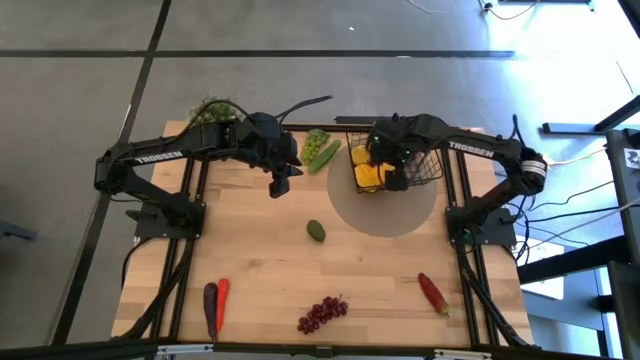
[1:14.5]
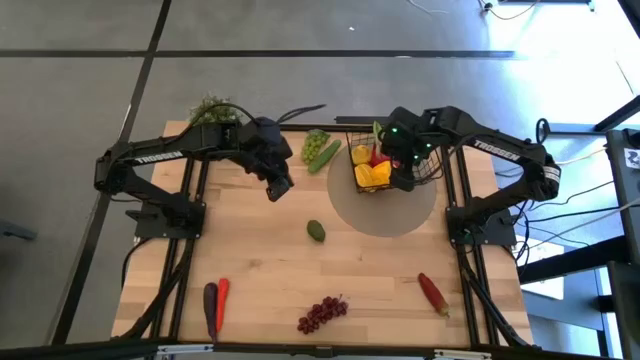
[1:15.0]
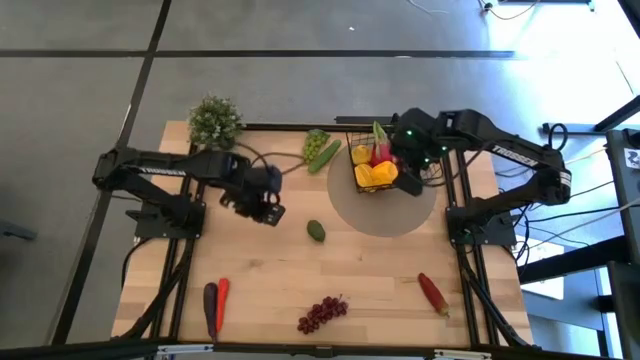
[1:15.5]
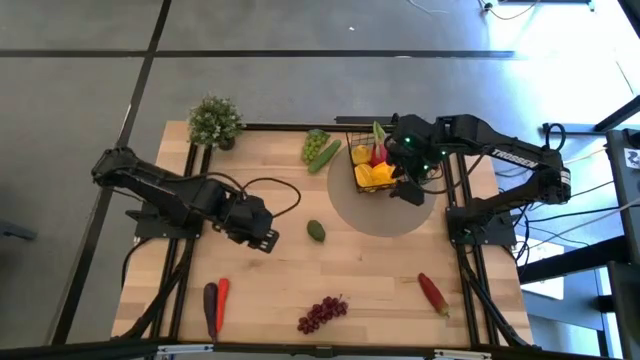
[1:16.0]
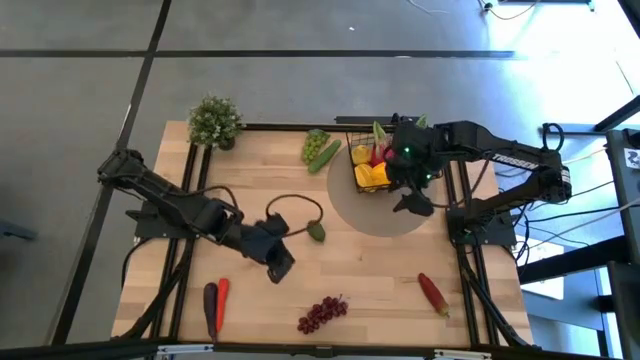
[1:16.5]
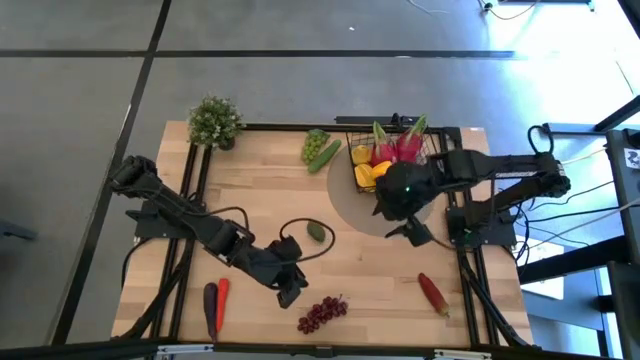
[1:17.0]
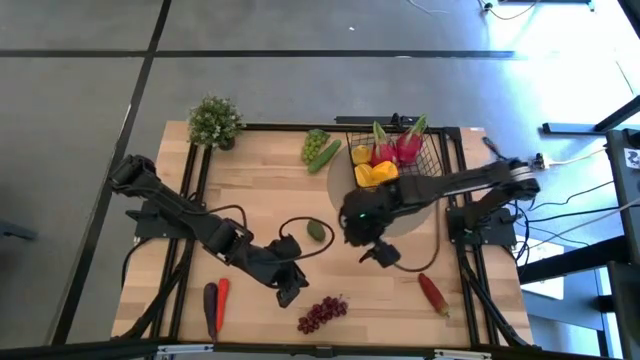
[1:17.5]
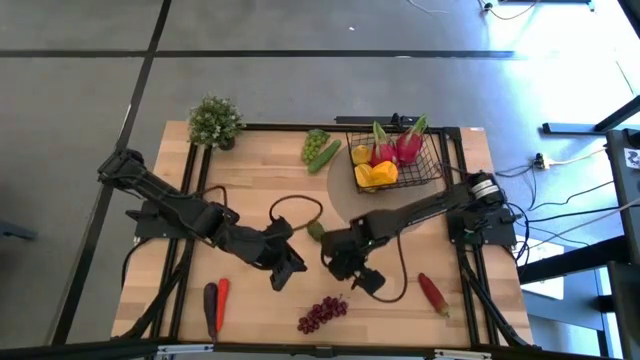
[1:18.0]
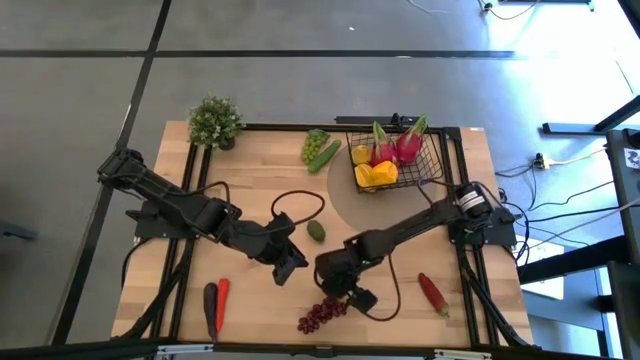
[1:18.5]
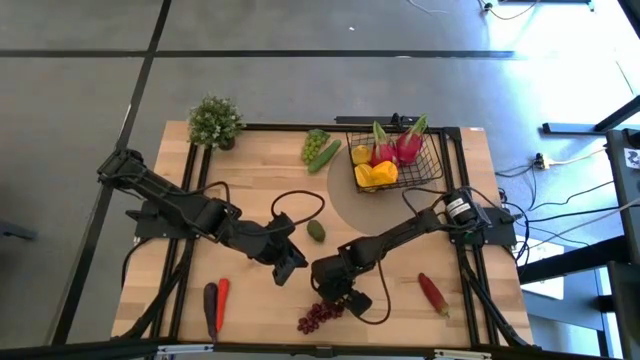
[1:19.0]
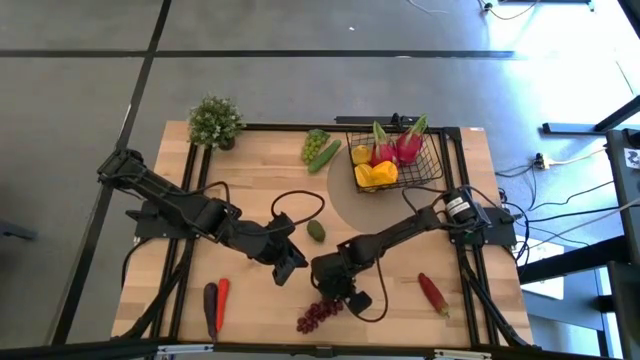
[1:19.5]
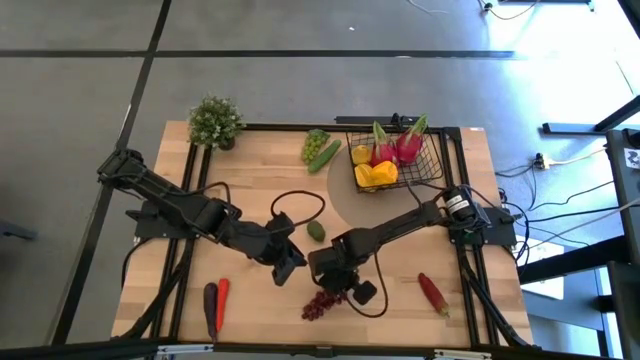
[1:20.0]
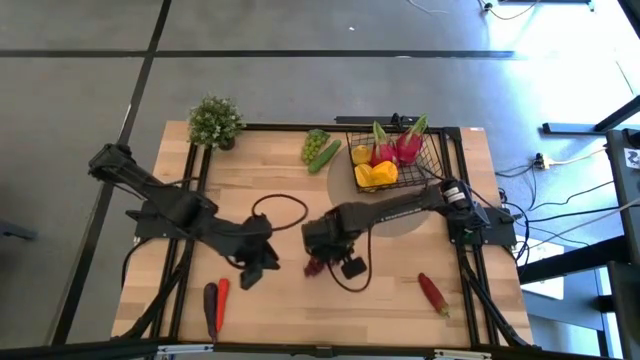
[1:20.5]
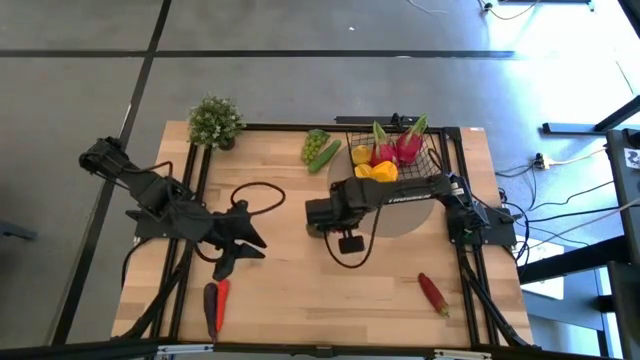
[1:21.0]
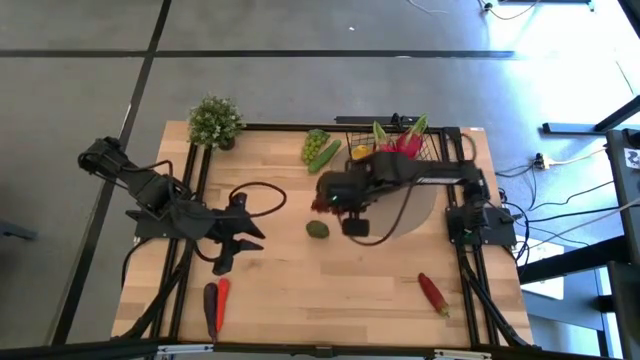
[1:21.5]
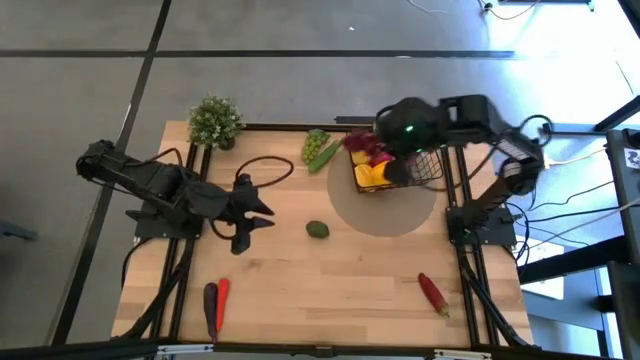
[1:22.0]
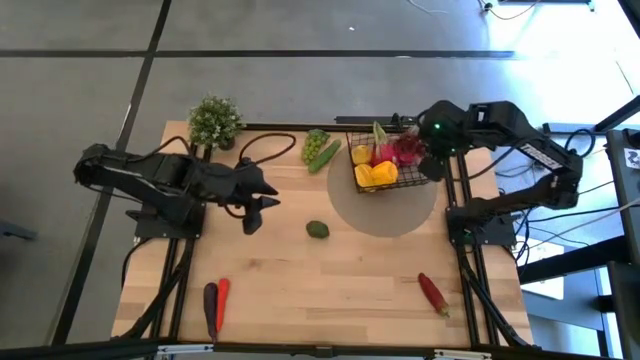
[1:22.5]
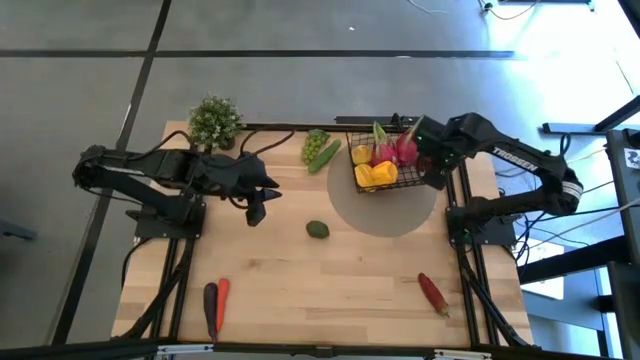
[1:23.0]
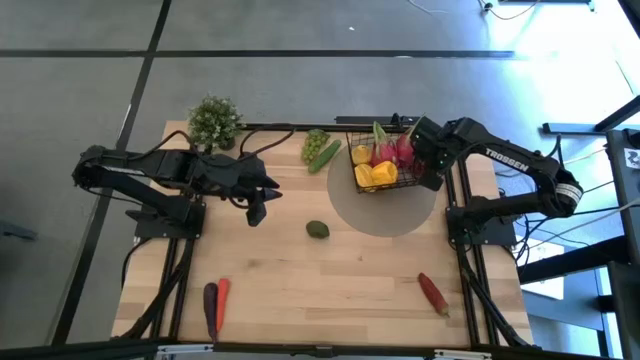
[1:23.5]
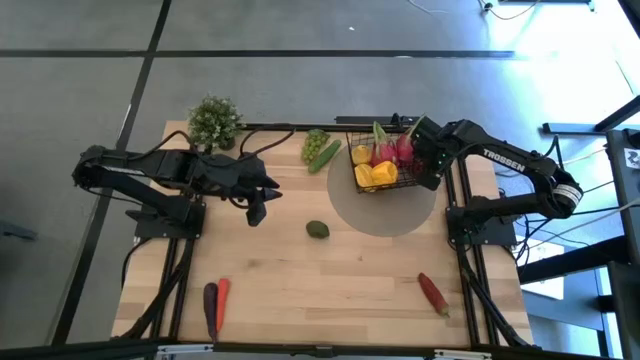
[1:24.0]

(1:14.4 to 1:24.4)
Task: Build produce basket
Put the red grapes into the wire basket

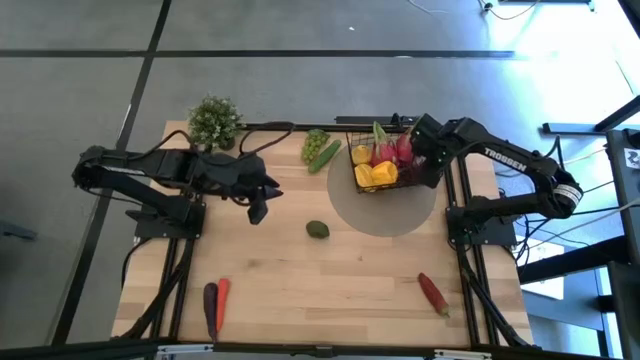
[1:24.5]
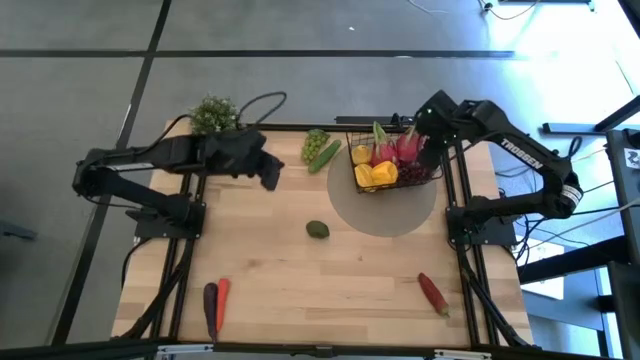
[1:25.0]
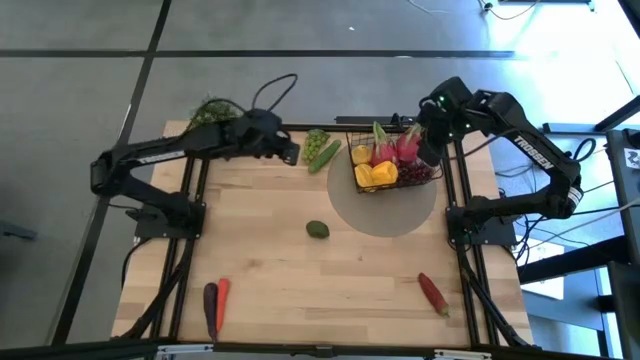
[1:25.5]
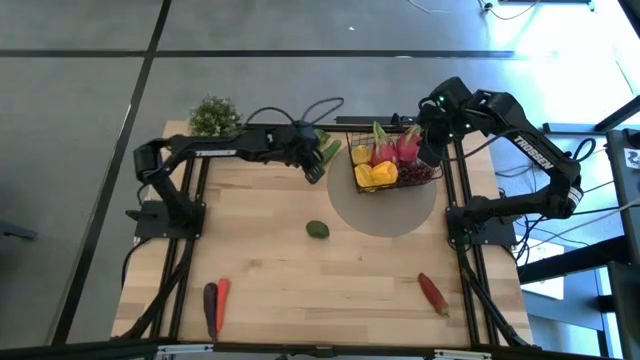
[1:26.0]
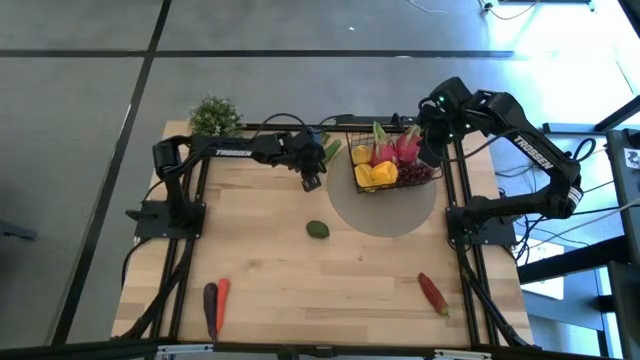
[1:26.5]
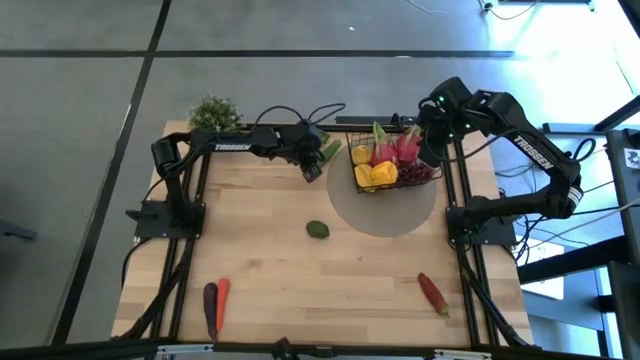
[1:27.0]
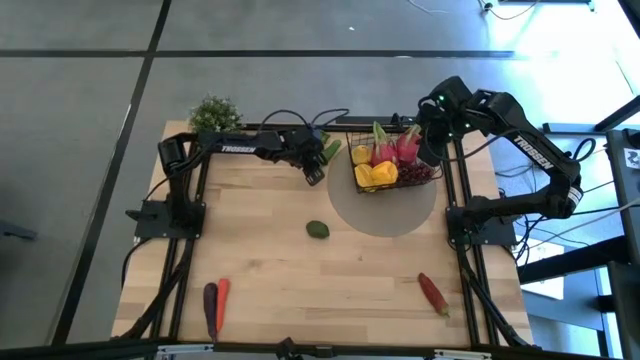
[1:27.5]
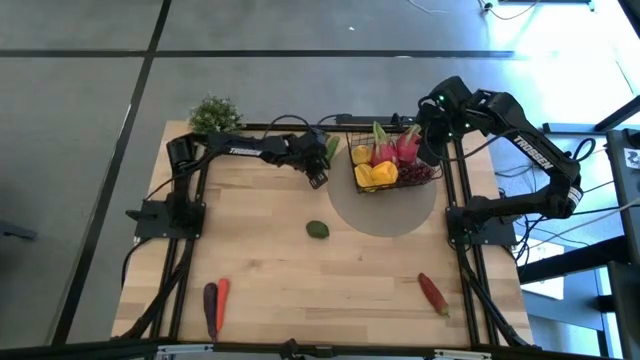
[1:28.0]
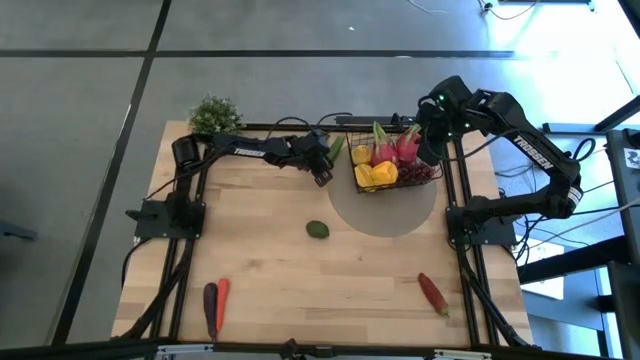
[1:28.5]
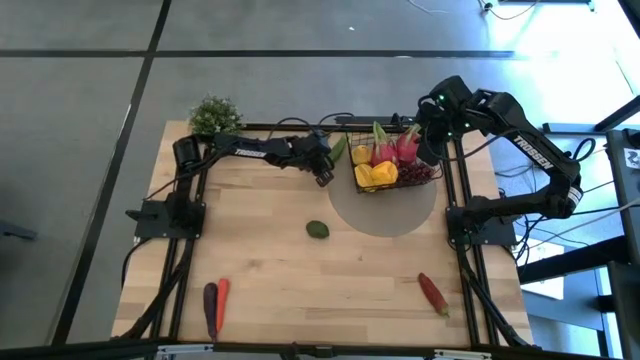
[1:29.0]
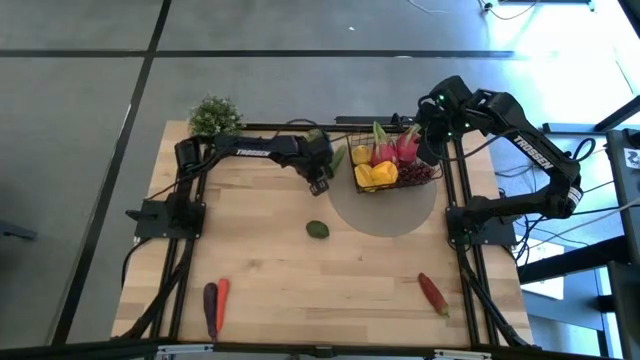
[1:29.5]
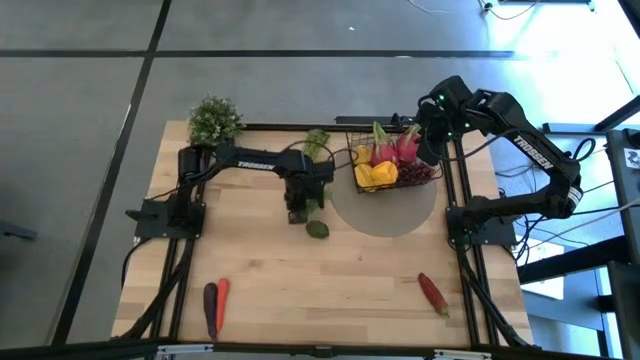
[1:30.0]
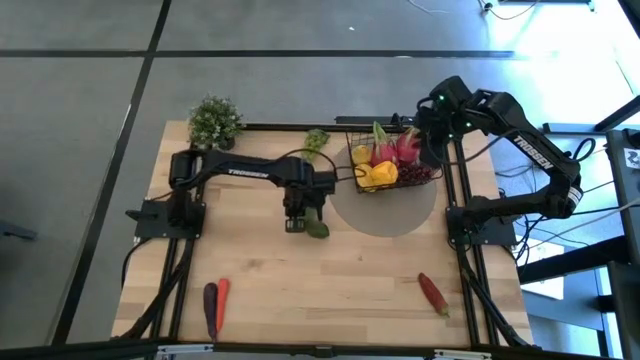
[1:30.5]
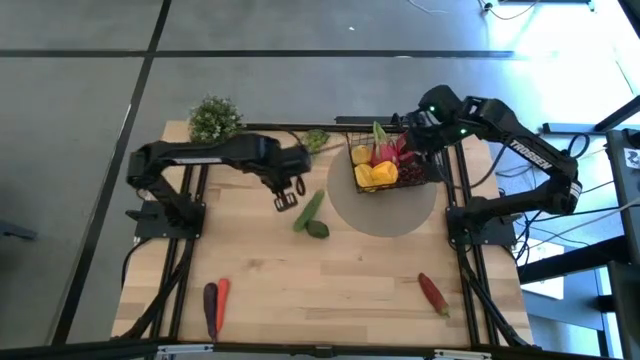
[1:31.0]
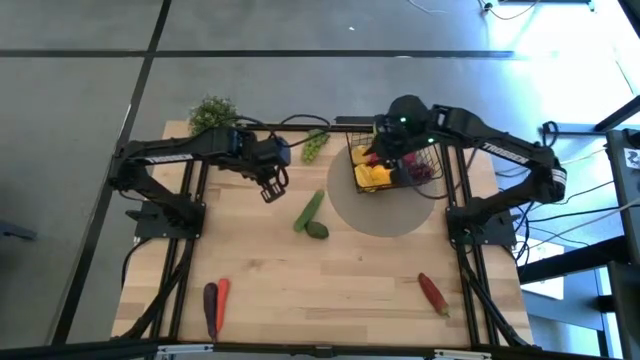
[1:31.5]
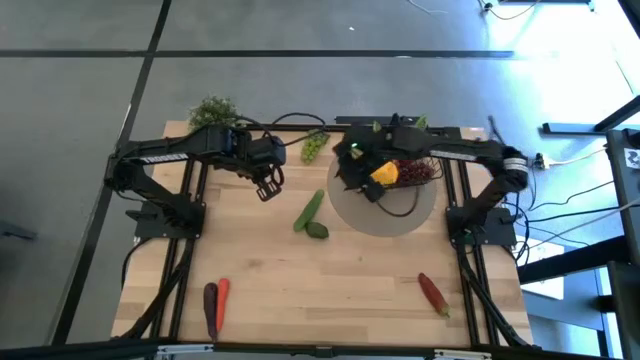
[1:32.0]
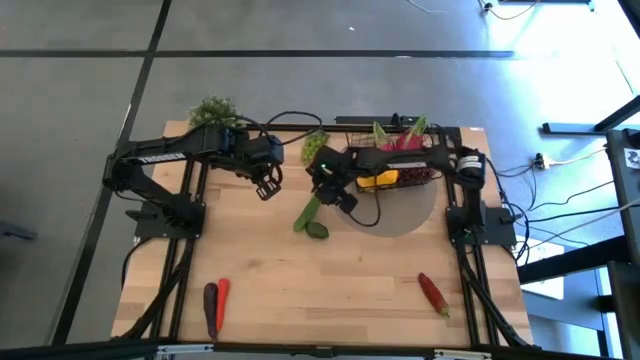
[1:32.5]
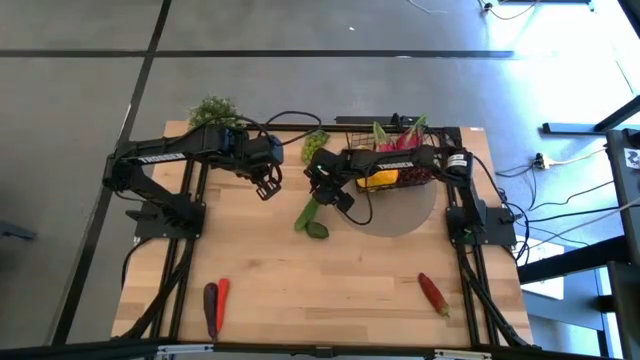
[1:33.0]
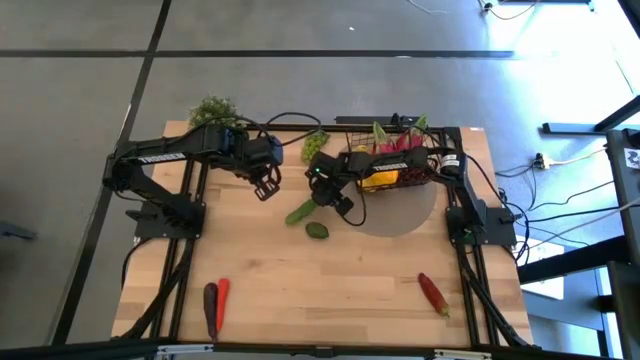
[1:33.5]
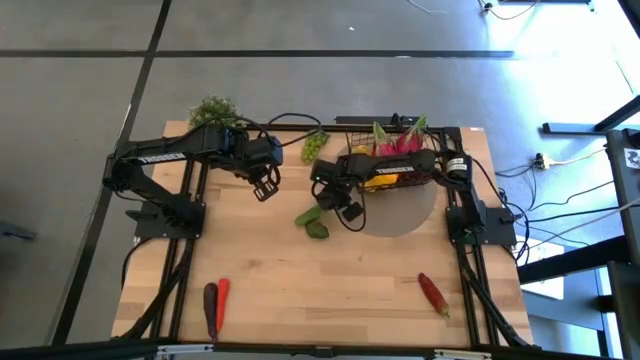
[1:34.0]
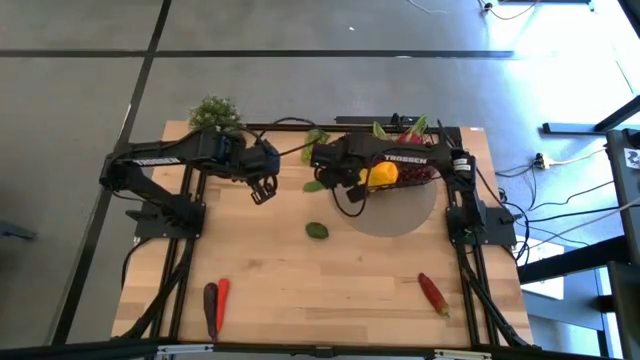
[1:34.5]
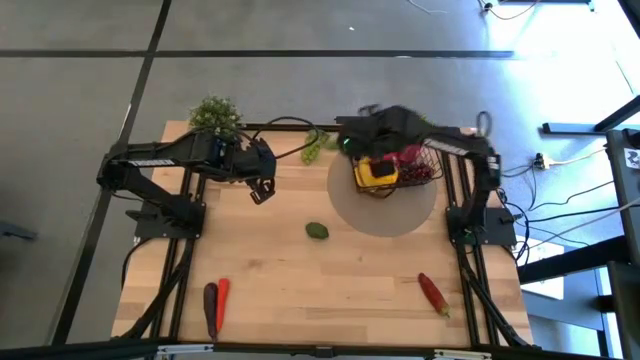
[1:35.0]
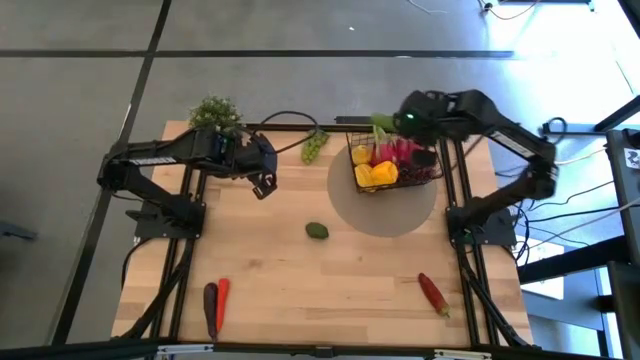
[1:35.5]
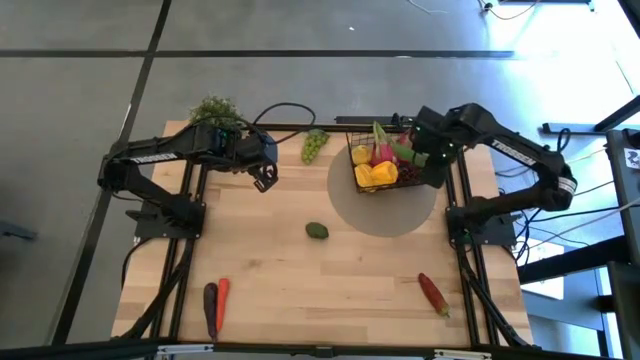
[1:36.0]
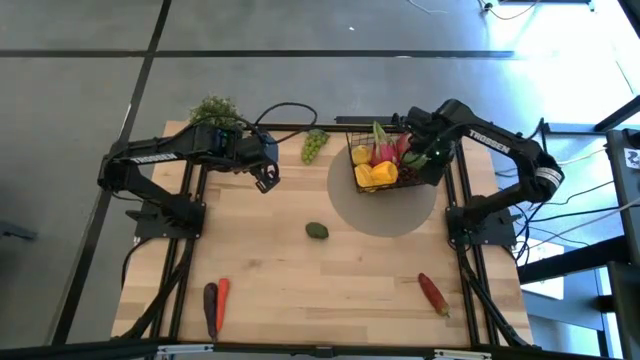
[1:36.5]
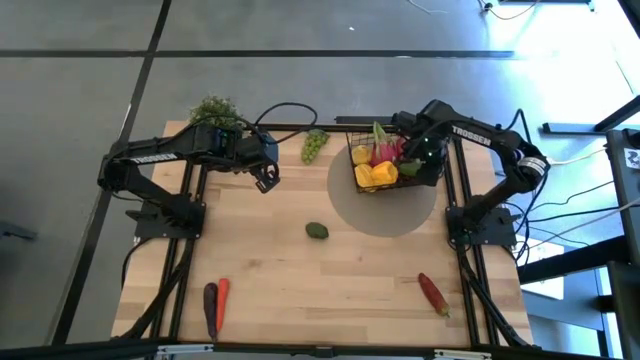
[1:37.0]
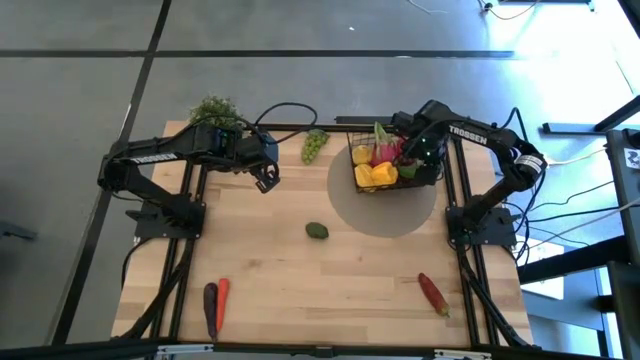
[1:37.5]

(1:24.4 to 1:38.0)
Put the cucumber into the wire basket
